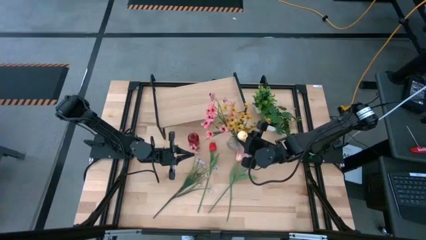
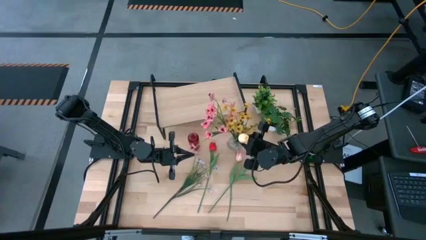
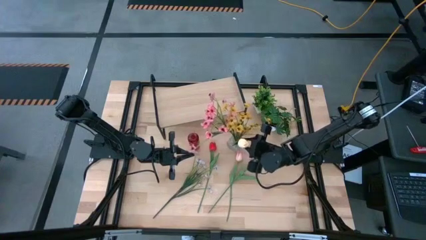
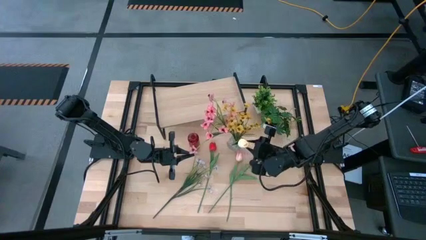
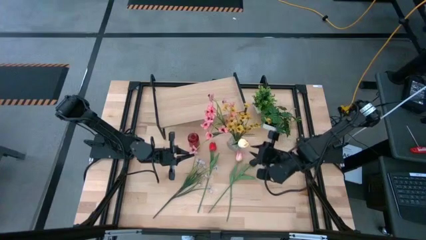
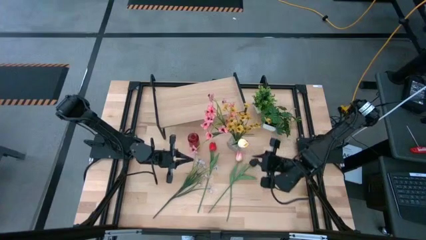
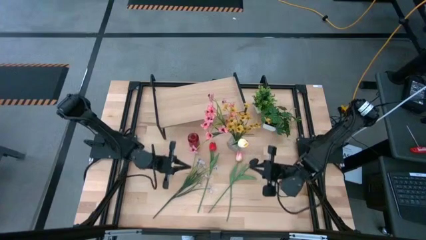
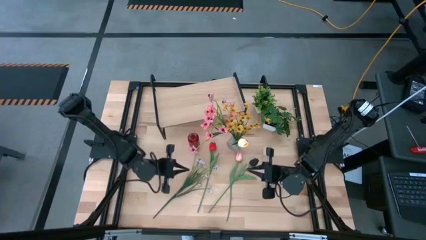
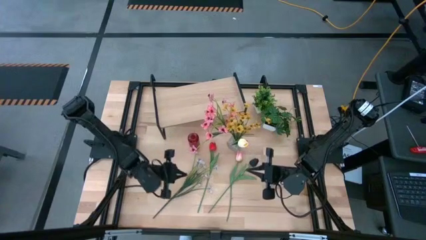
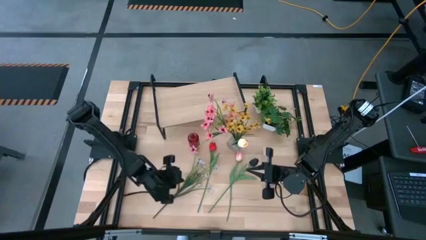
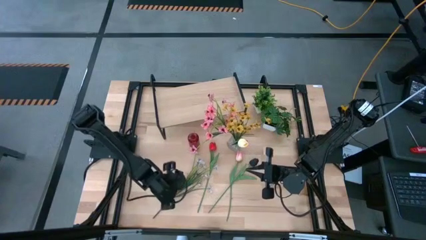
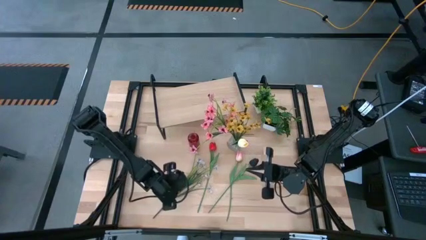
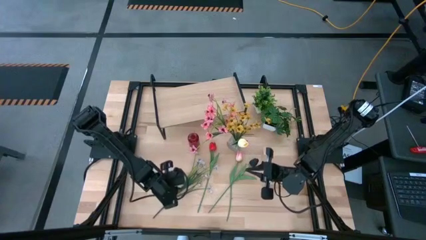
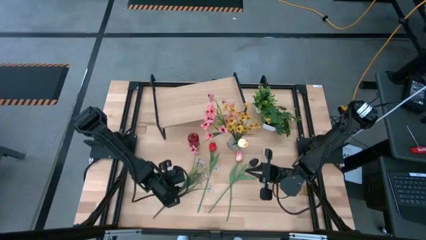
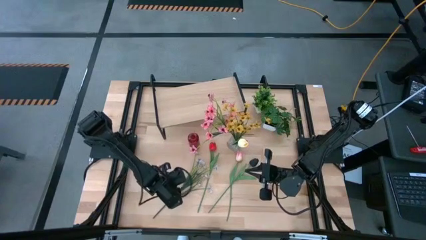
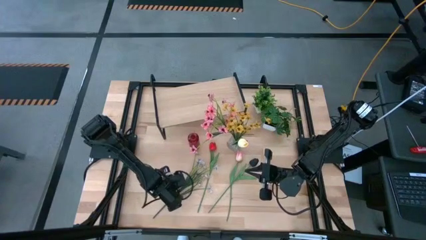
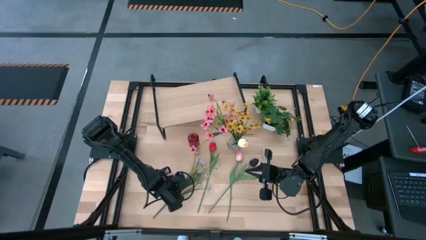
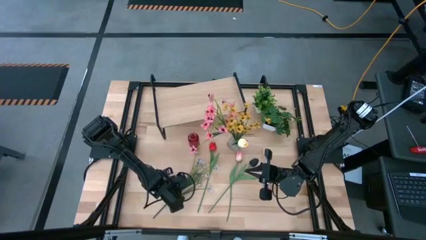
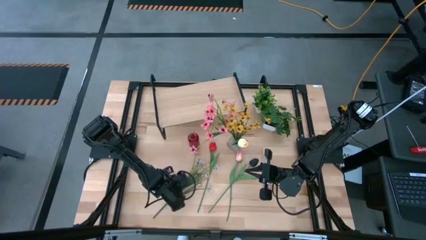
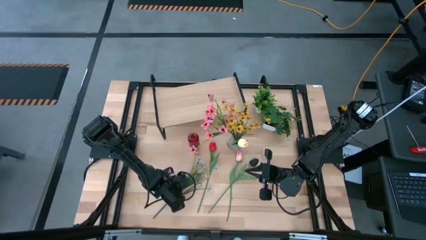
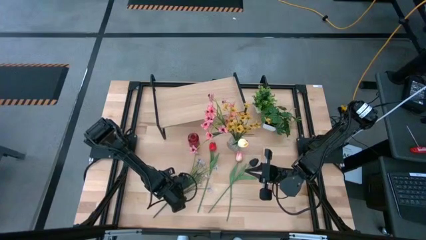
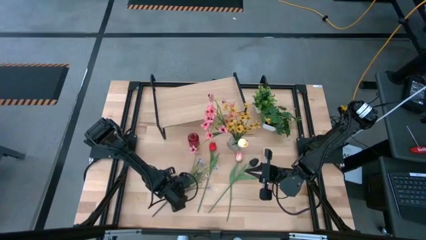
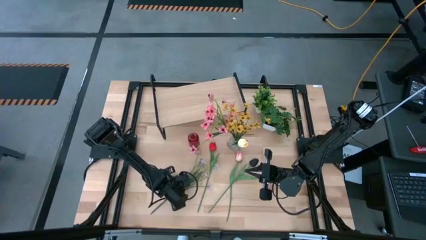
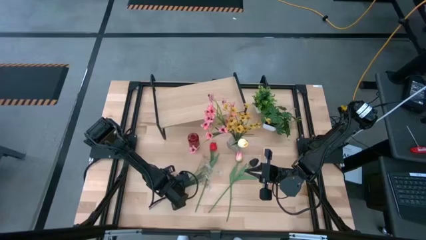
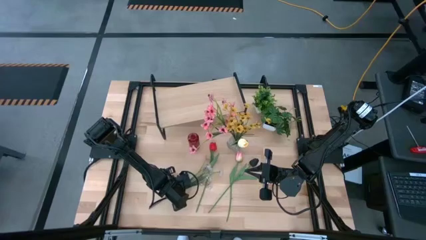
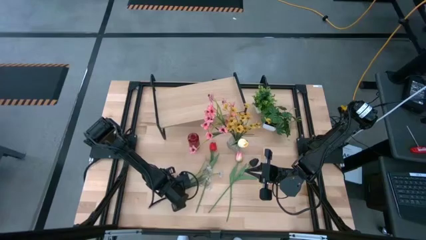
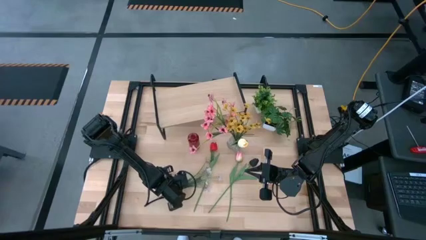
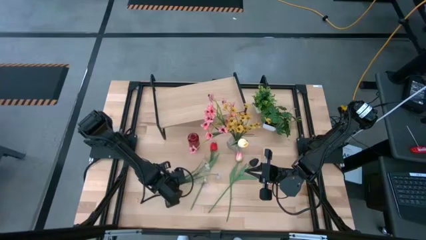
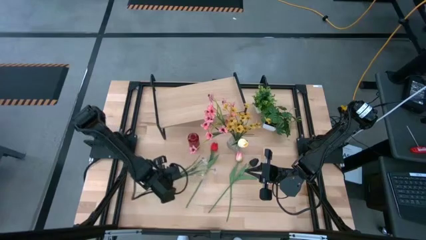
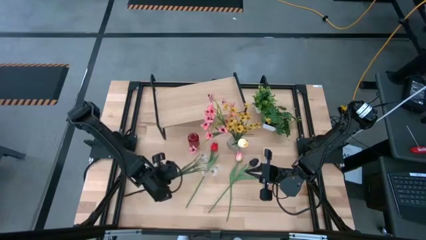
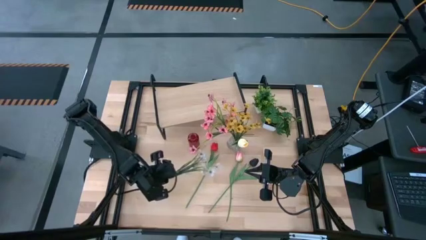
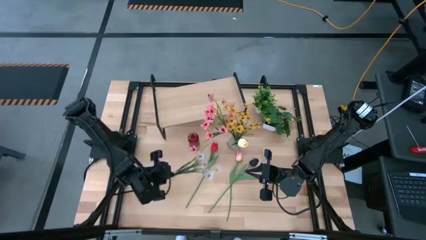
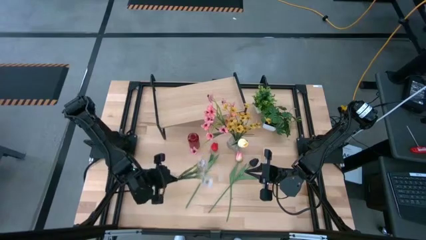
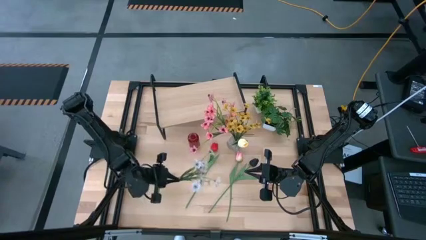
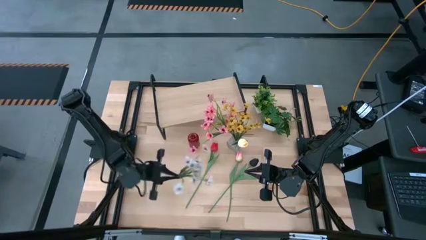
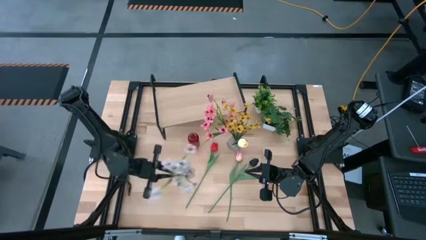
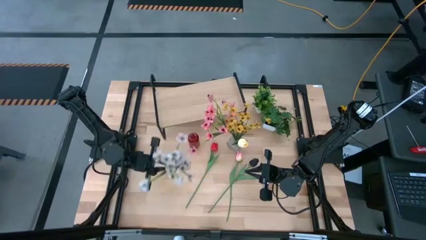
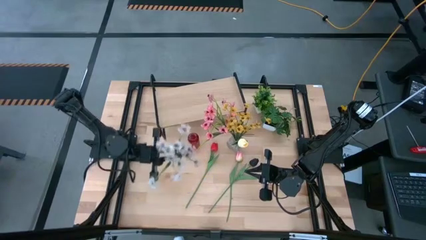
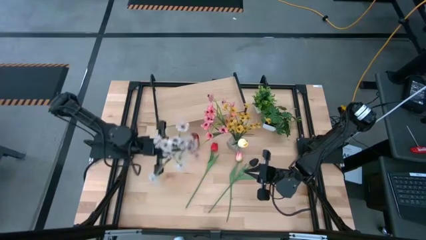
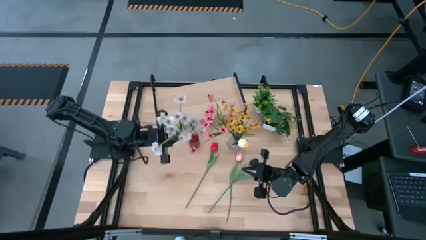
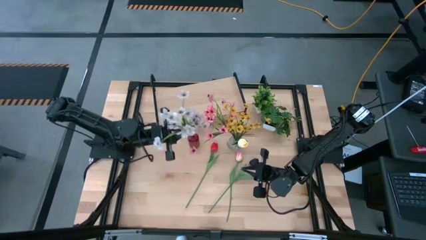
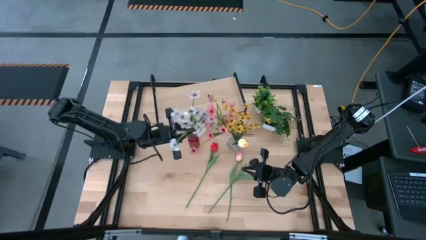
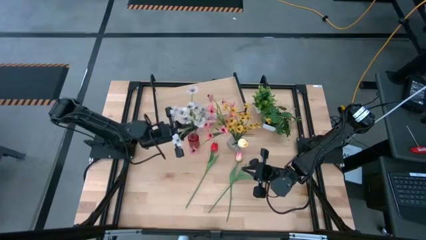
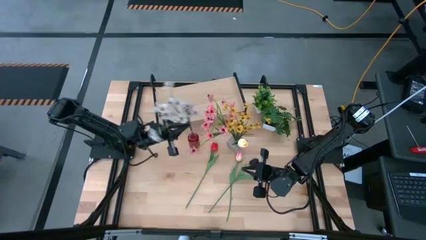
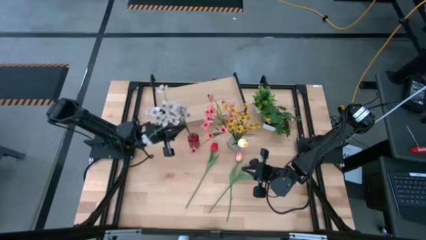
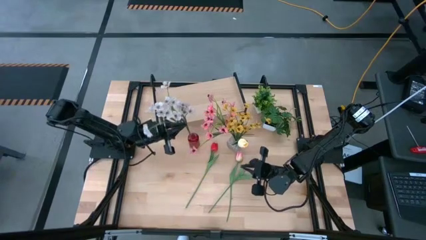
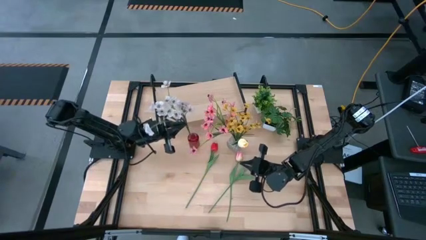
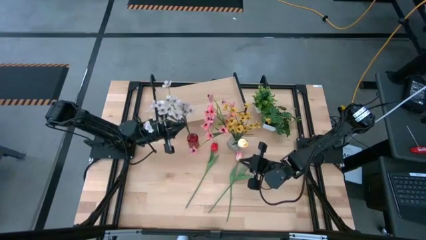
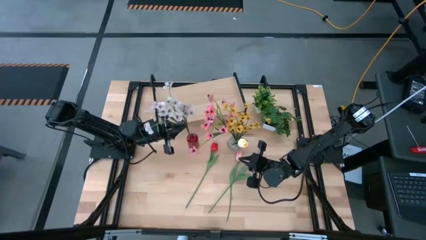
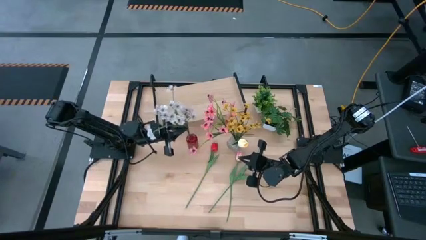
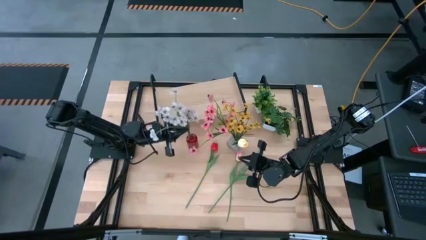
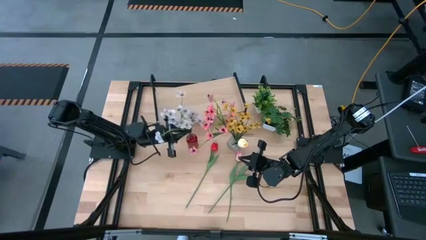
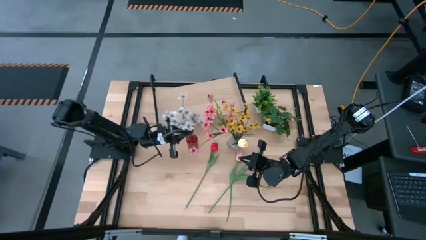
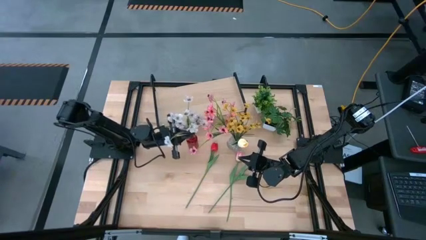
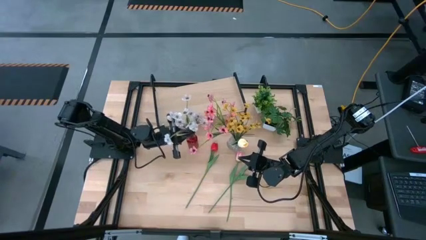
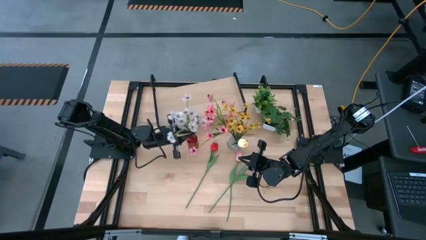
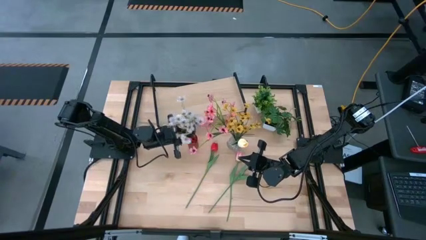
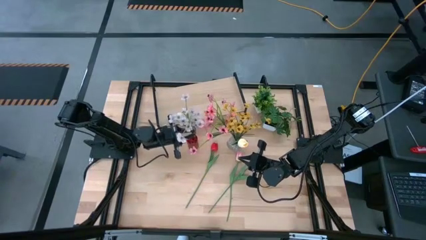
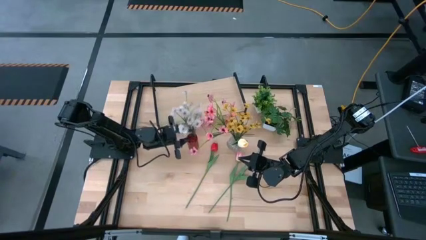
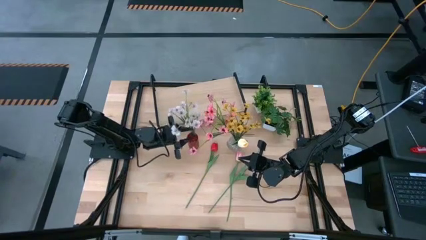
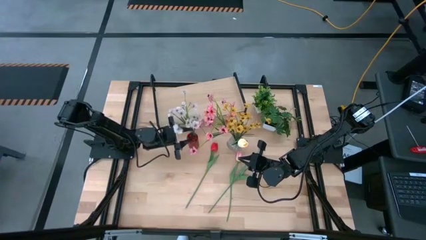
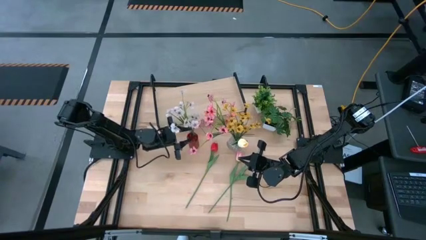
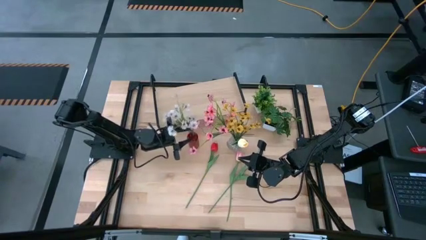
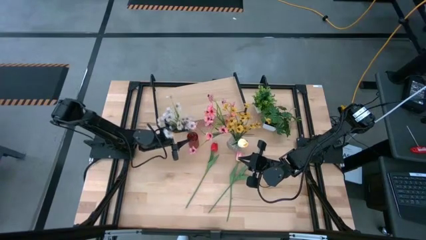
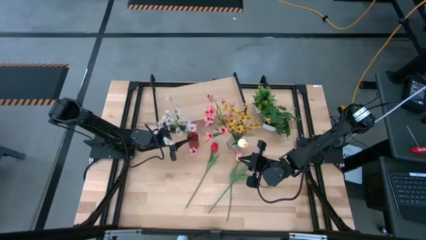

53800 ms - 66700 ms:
Task: Pick and place flowers into a vace then onto a shelf
Put the white flowers into the red flower vase
